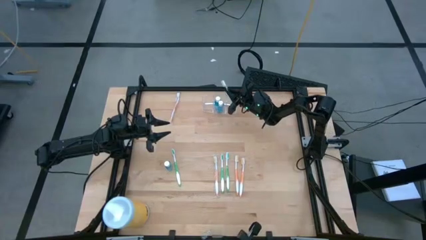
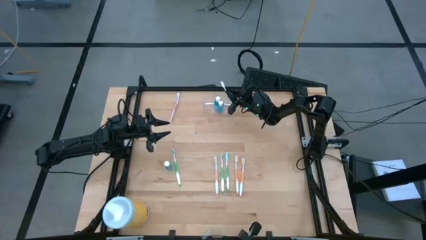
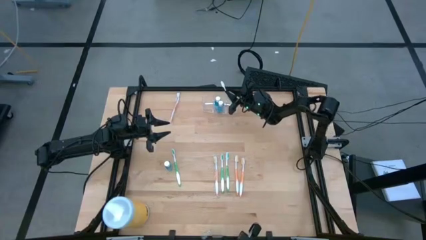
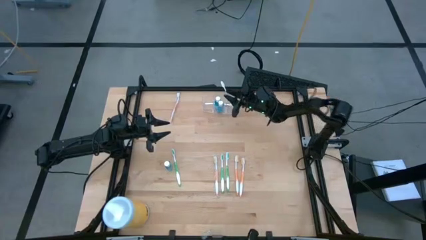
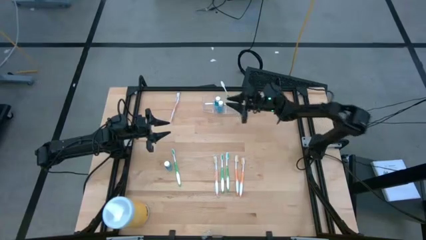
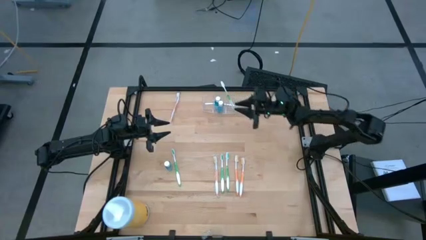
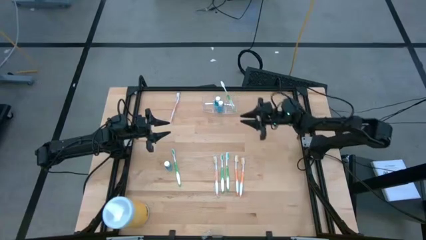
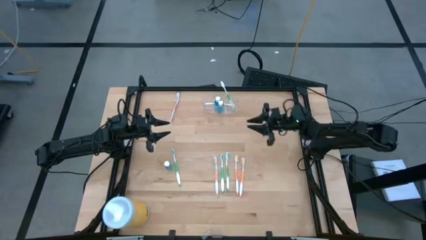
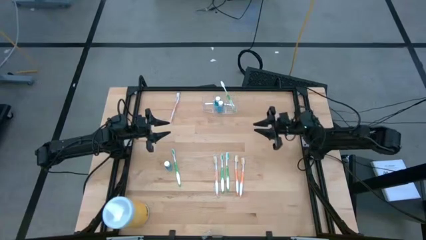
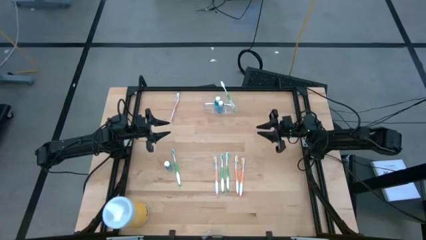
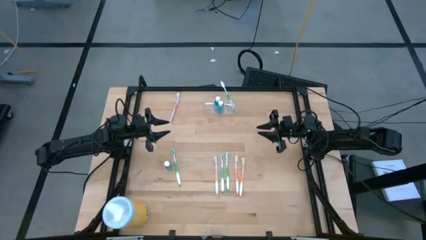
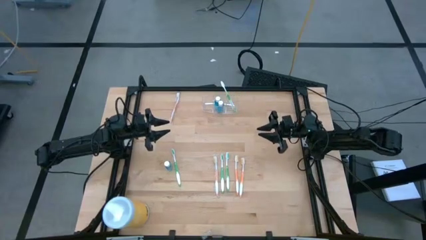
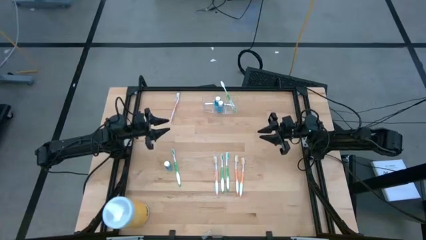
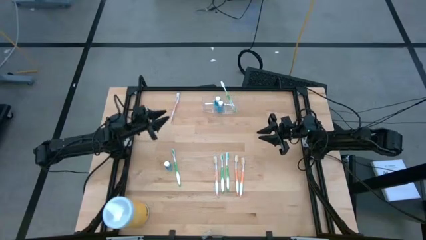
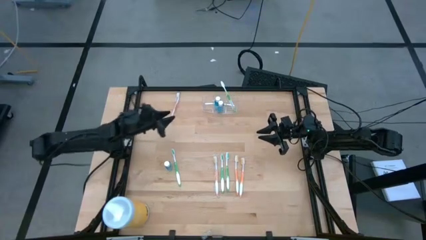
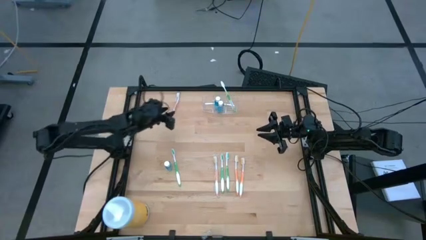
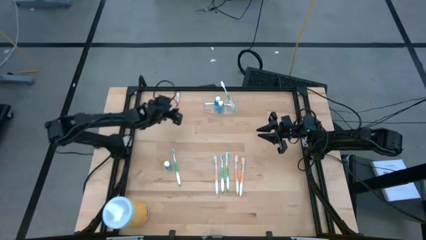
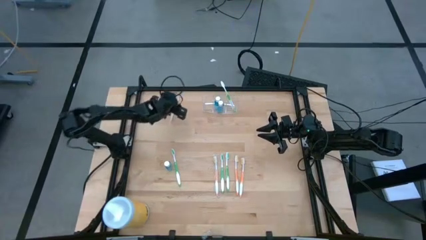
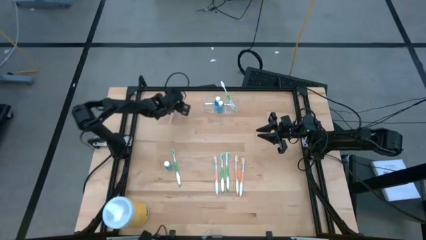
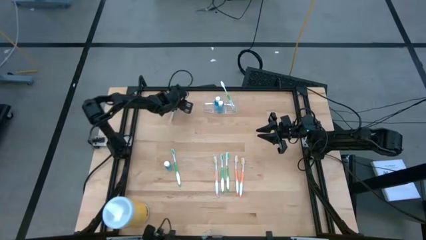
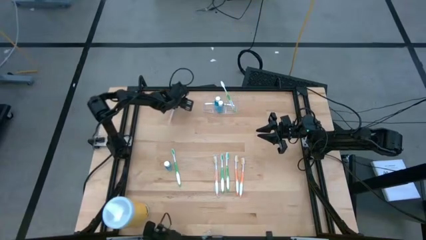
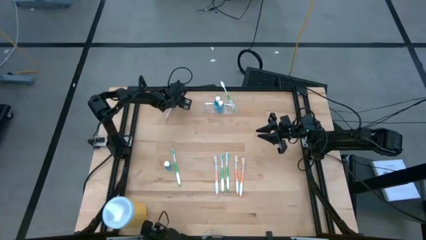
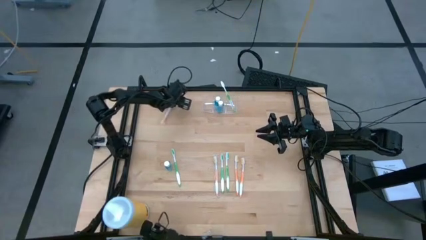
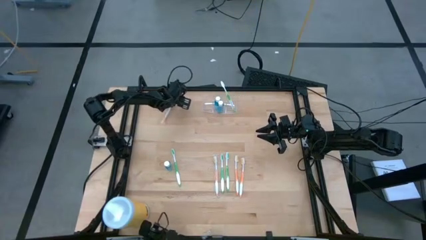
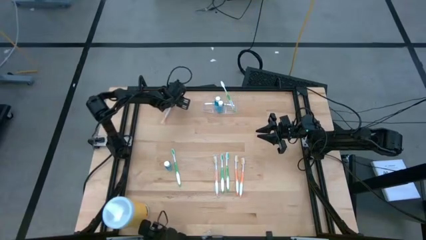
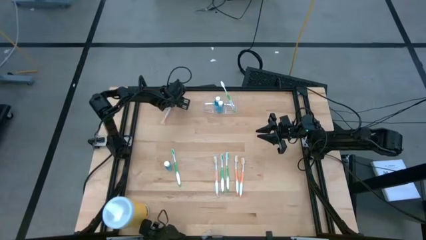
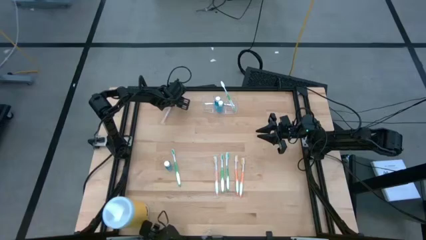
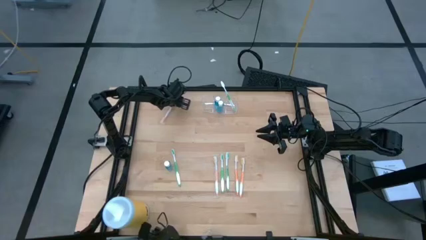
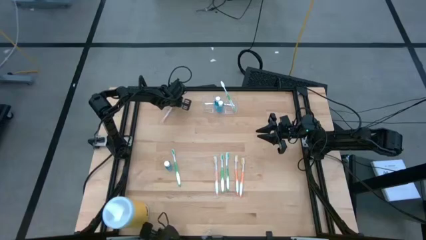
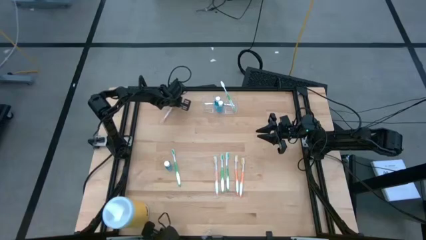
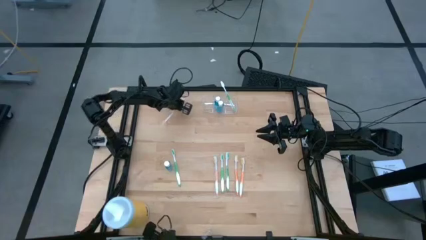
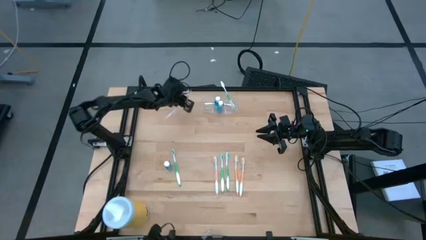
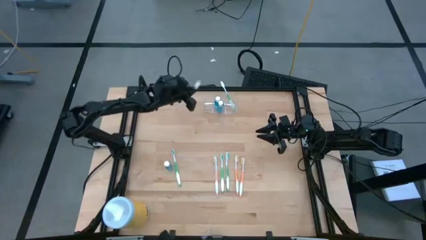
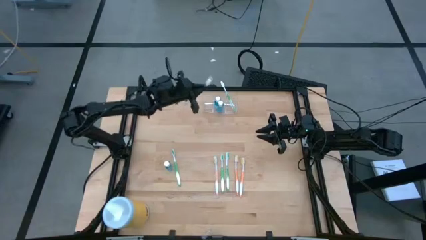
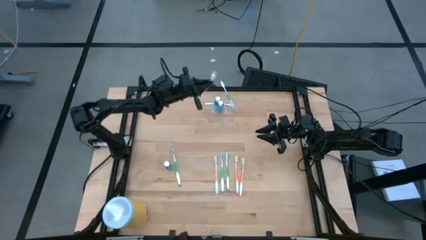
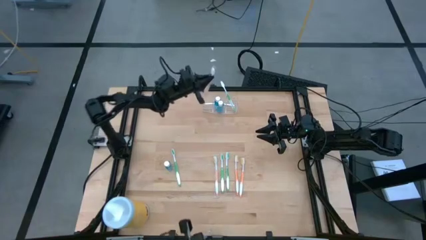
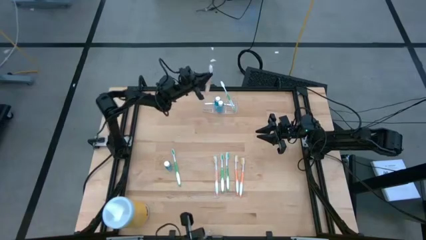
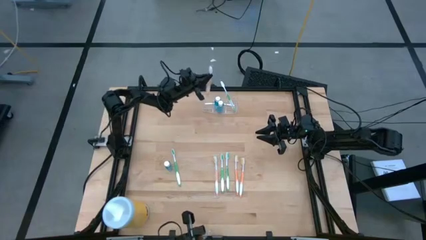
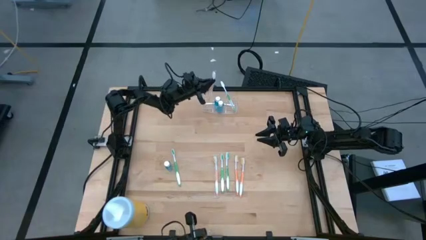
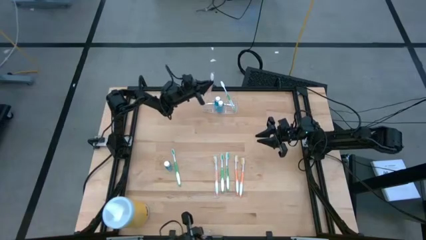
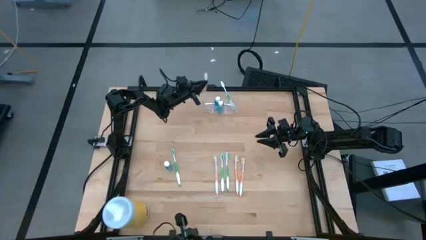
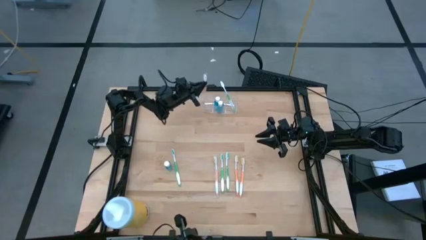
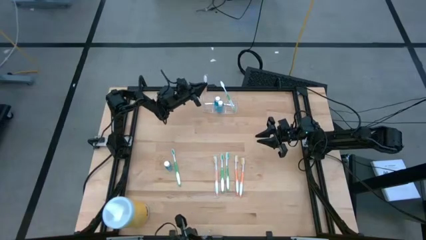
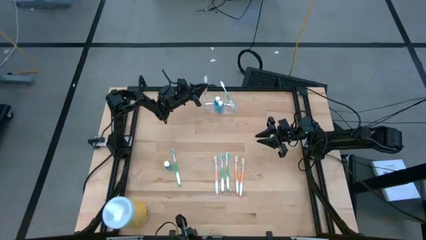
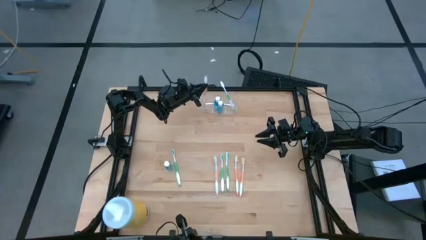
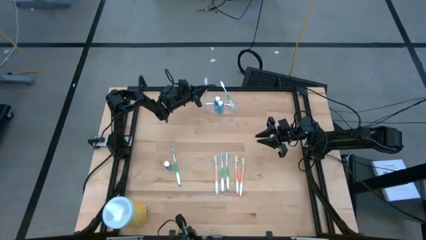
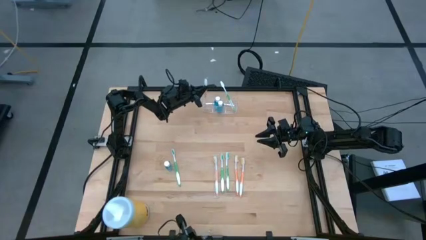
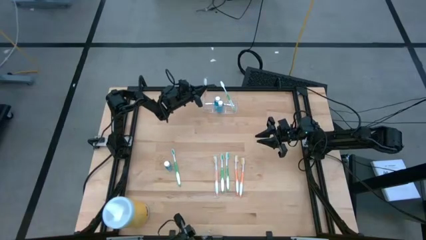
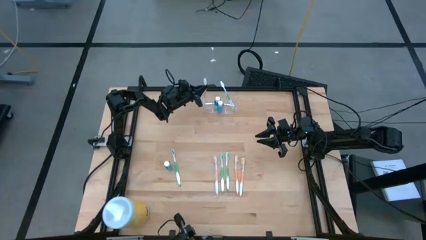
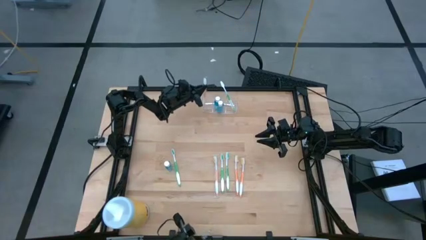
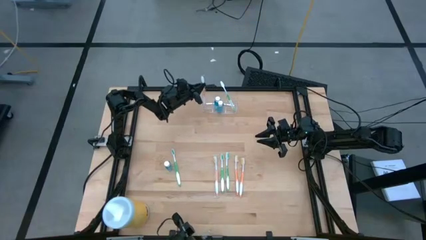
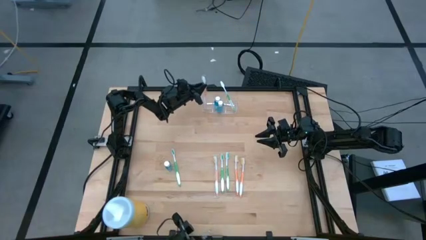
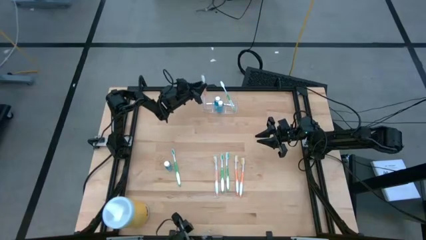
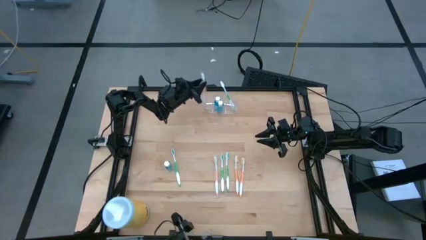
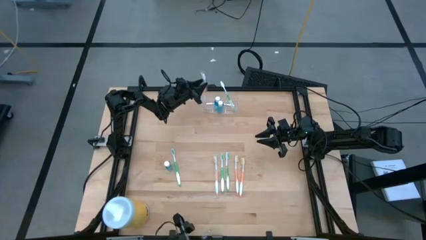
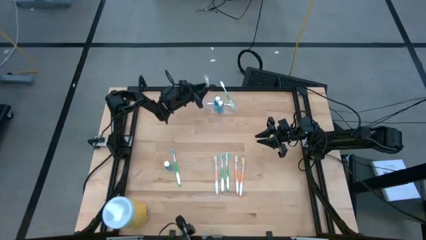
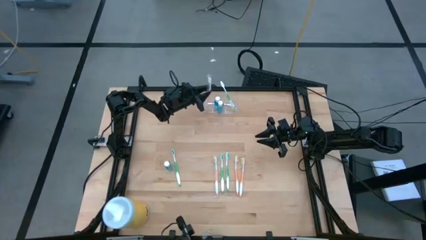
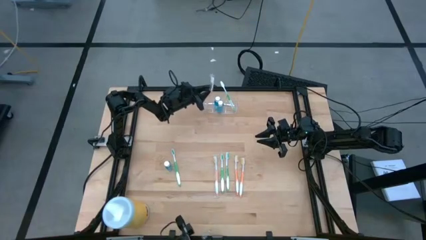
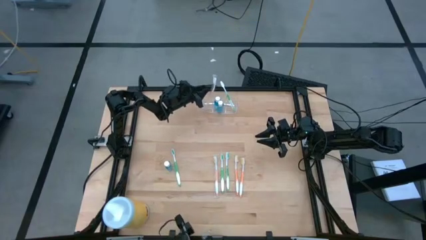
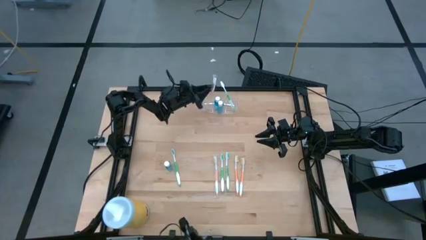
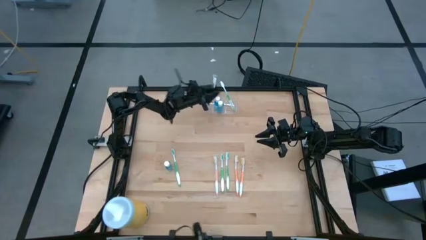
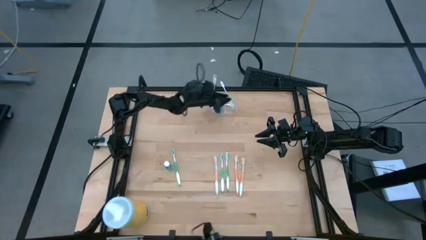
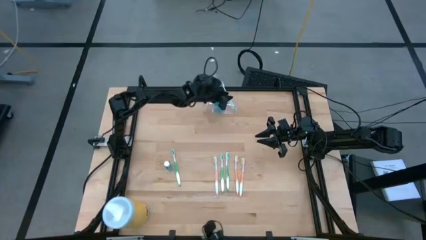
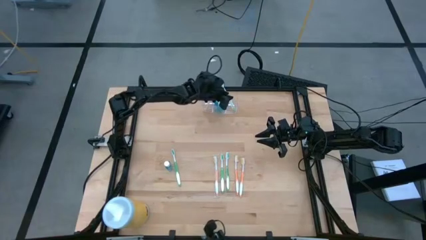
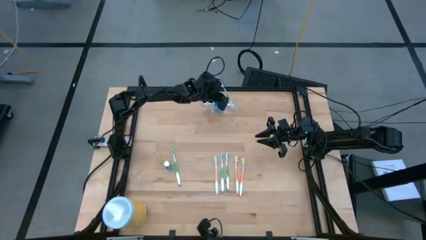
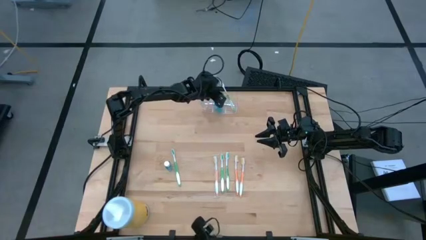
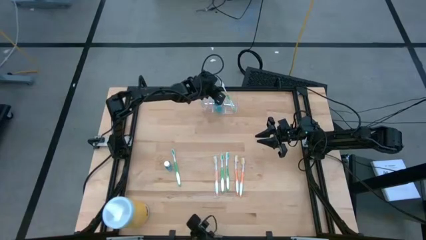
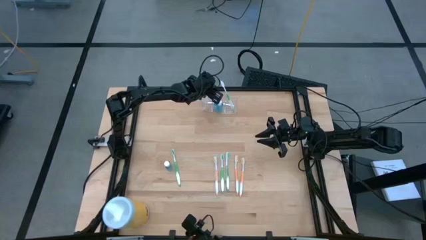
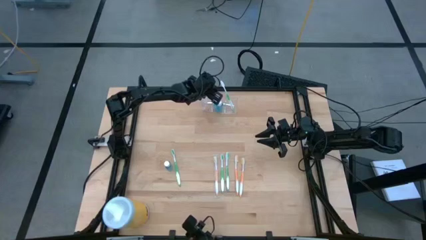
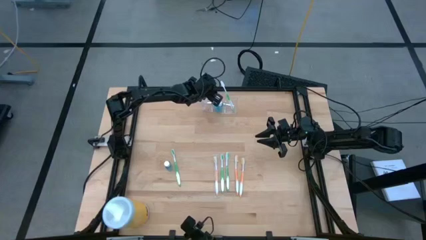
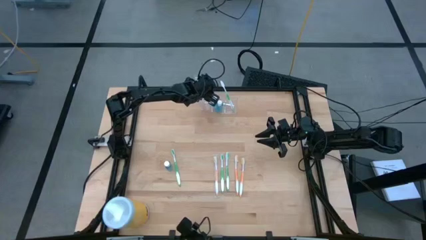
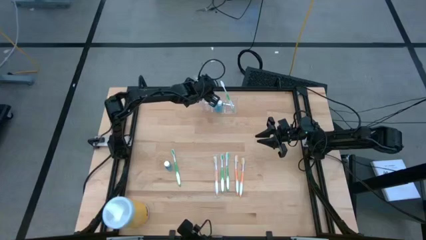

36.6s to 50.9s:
Task: Pick & Place toothbrushing station
Put the orange toothbrush into the transparent organizer
